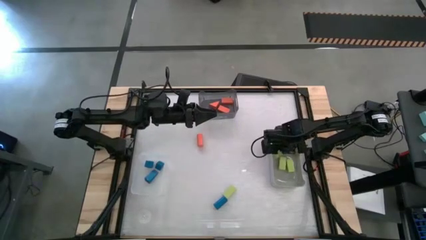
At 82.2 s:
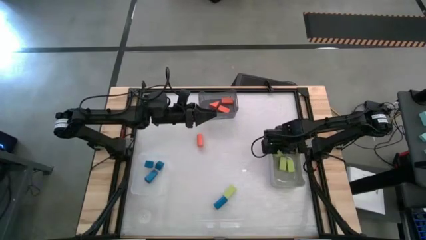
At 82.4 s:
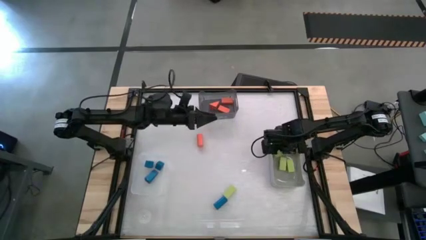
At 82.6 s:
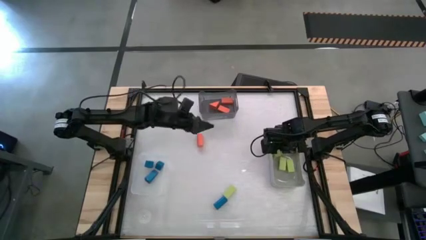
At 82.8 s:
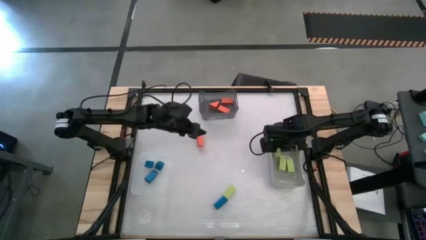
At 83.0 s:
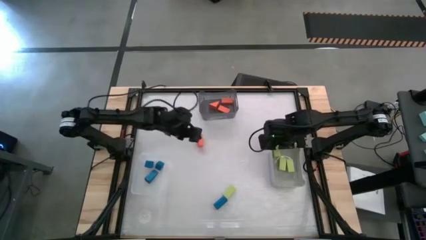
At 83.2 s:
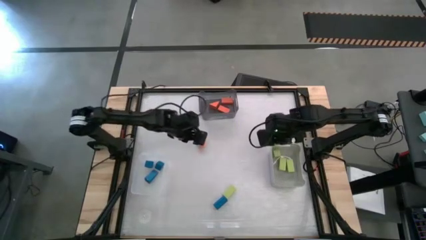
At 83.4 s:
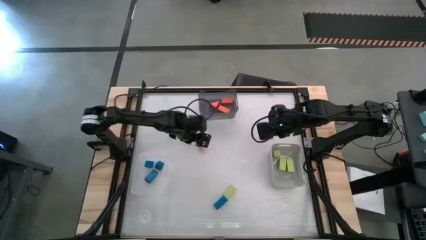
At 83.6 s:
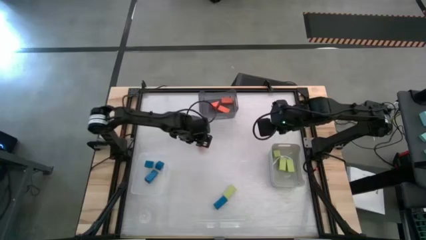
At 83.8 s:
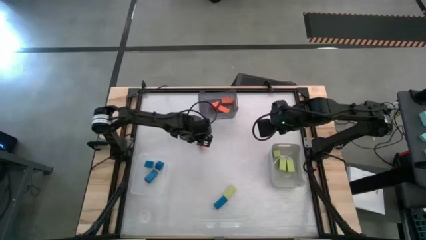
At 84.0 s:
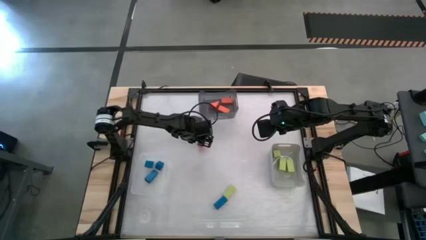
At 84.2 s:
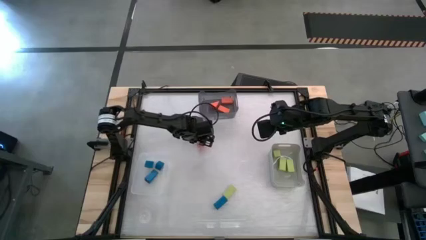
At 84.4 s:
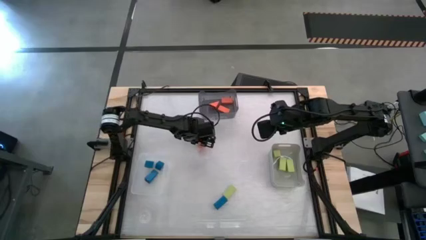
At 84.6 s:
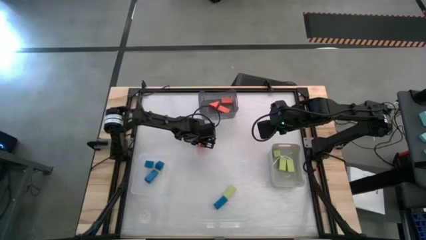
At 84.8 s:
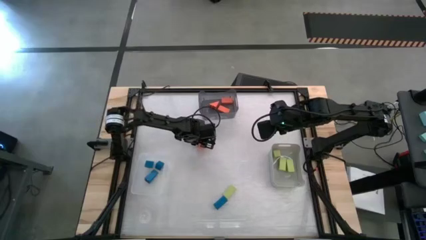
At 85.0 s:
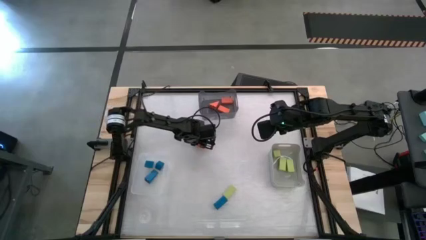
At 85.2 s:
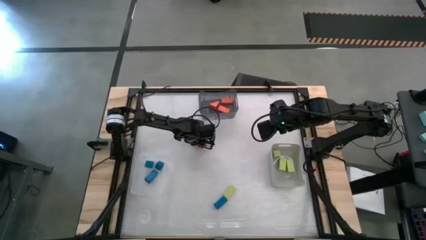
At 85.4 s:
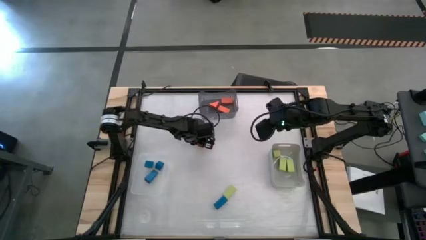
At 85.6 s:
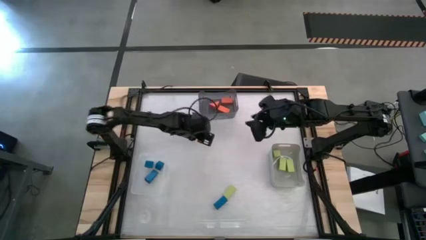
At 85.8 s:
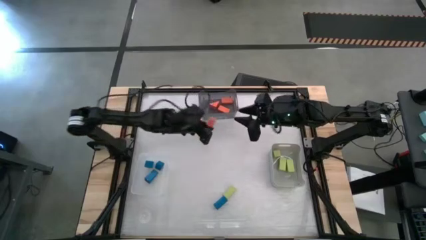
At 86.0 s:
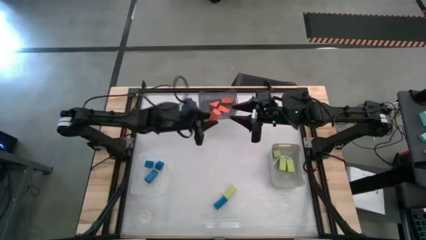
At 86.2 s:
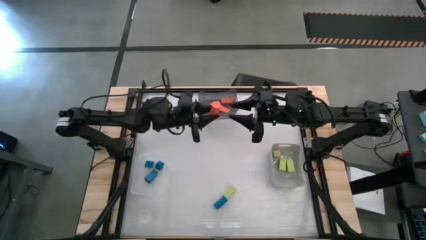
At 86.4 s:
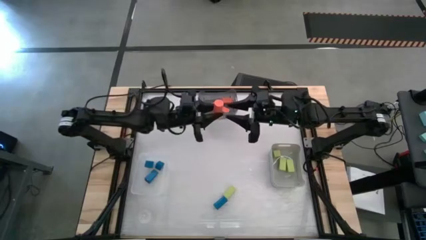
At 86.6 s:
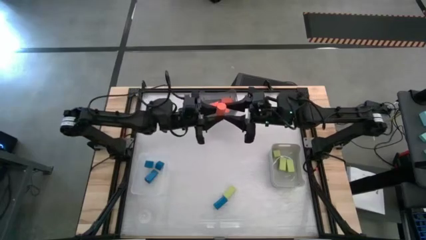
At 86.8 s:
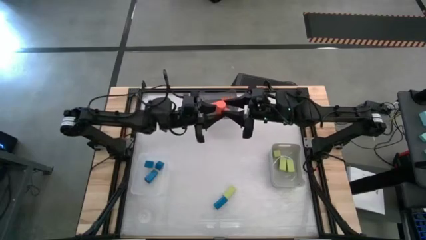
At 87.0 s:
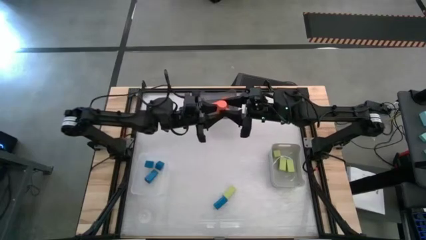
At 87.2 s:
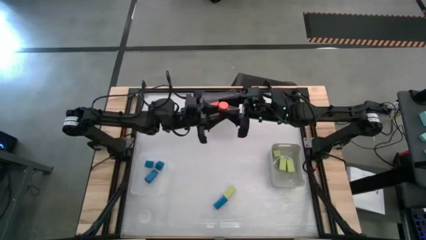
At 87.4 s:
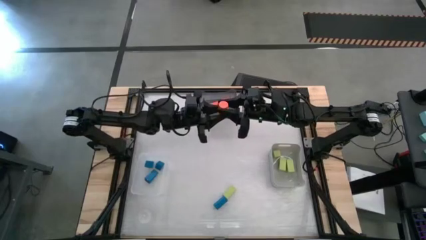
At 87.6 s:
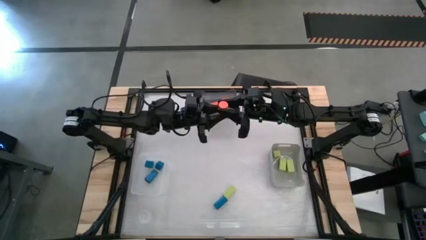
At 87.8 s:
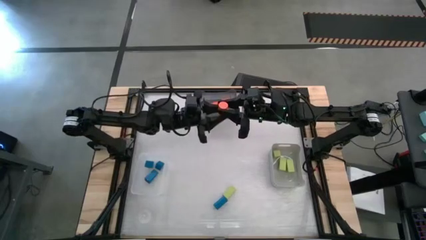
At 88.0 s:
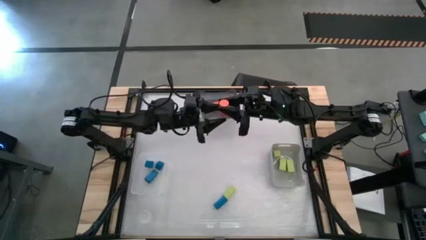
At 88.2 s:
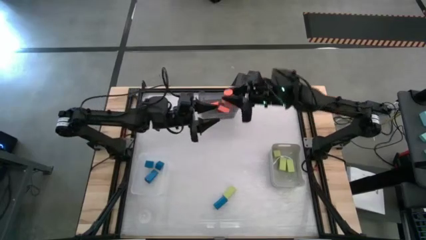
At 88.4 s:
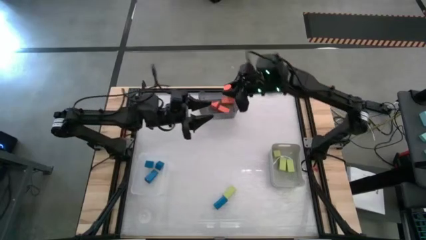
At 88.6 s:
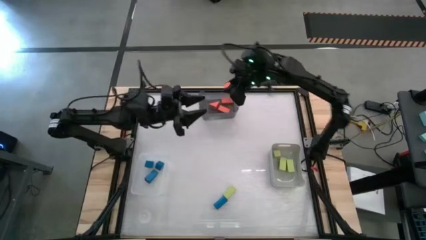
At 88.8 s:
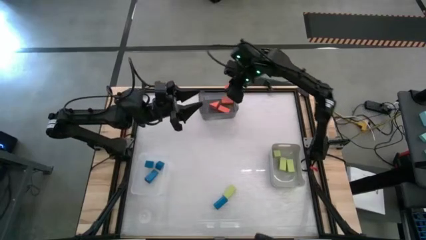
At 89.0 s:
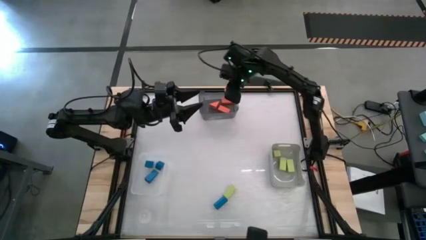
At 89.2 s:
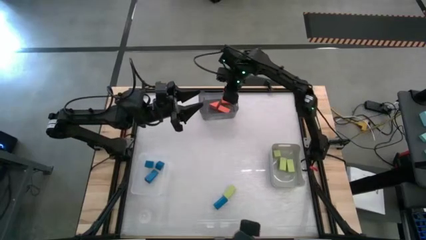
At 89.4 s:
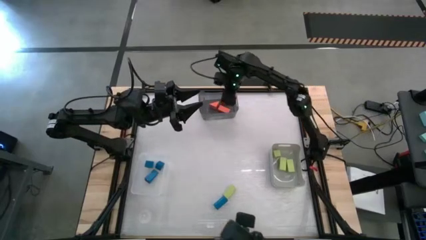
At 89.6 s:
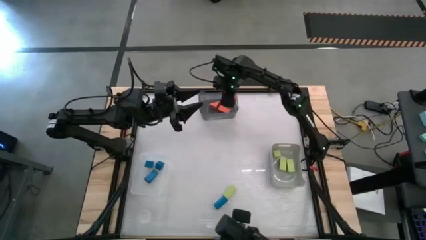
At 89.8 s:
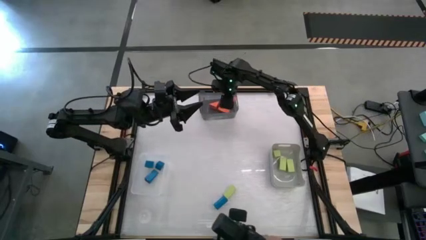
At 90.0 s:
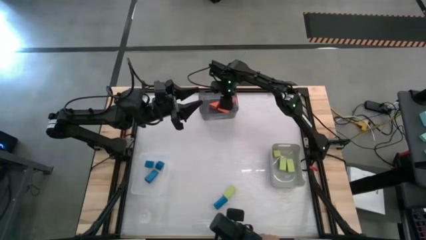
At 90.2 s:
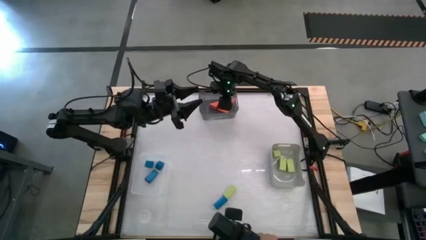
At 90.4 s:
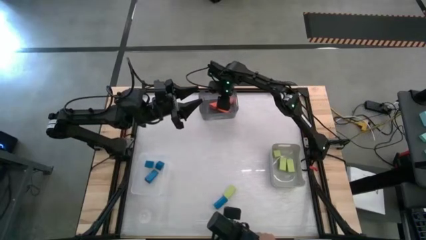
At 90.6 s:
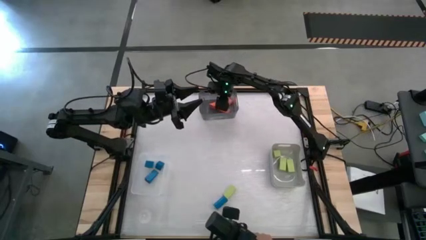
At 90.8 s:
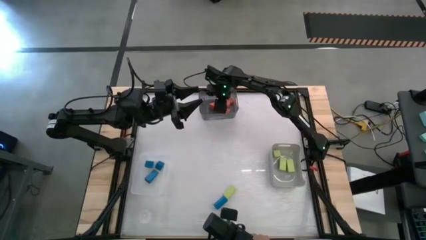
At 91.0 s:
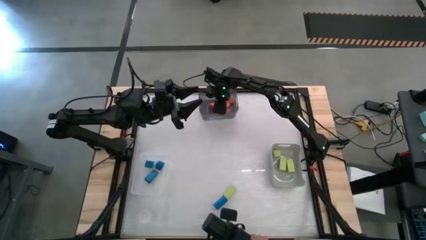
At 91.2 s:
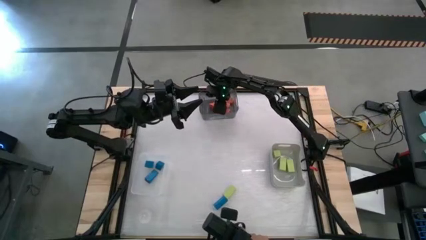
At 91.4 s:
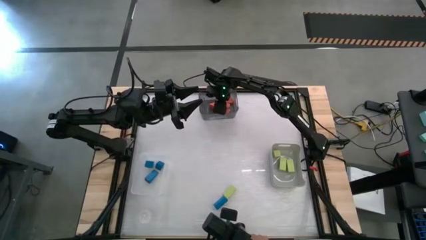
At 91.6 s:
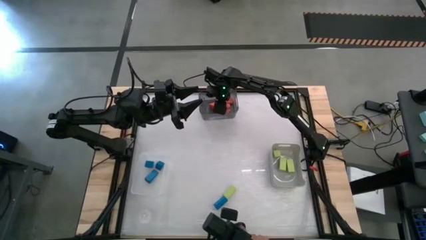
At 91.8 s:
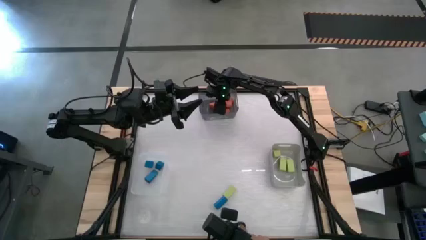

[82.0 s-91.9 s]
Task: Sort & place blocks by color
Put the orange block into the black bin

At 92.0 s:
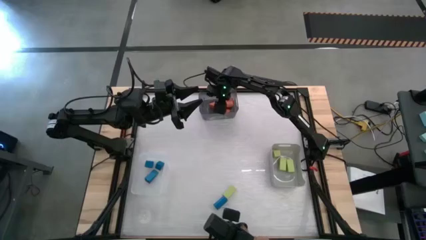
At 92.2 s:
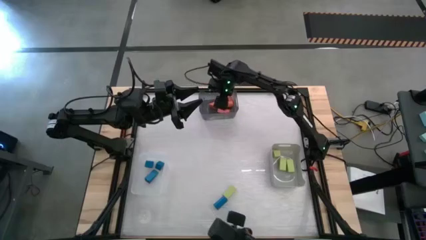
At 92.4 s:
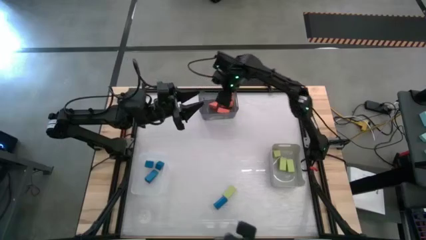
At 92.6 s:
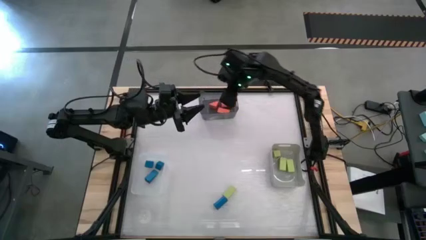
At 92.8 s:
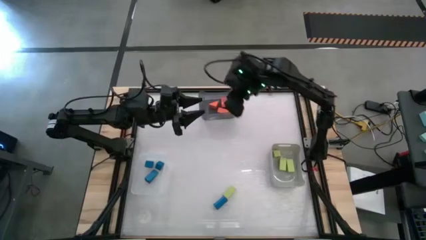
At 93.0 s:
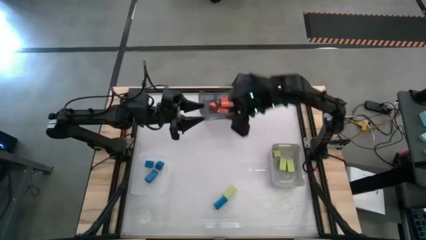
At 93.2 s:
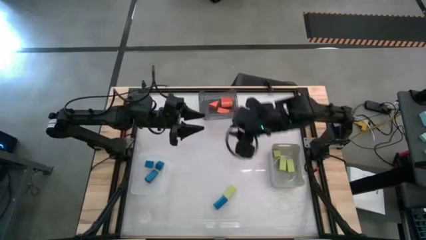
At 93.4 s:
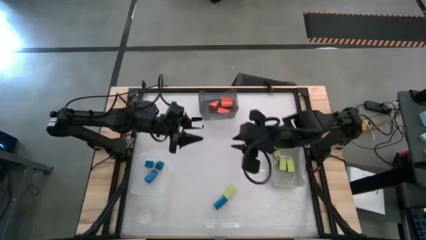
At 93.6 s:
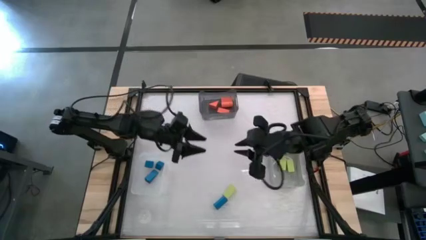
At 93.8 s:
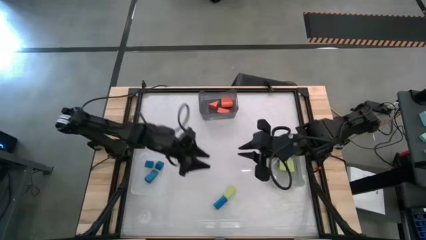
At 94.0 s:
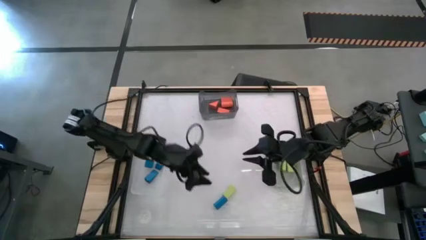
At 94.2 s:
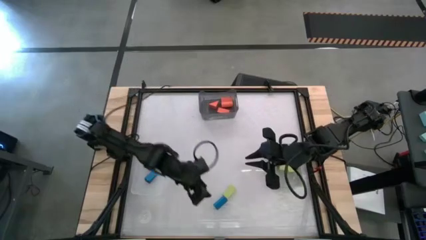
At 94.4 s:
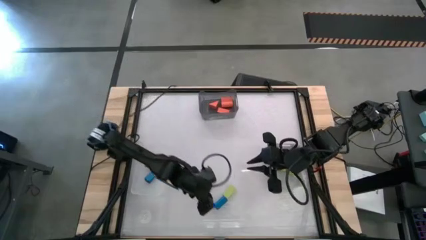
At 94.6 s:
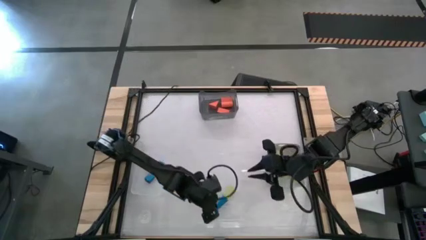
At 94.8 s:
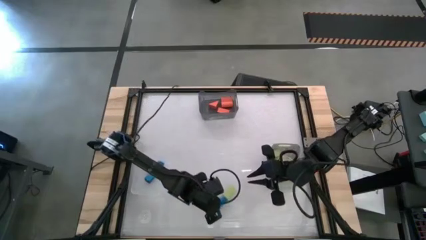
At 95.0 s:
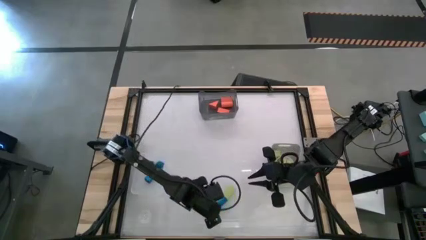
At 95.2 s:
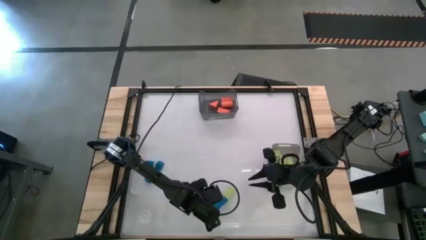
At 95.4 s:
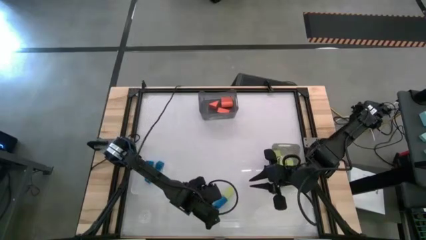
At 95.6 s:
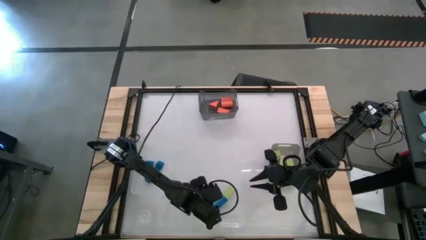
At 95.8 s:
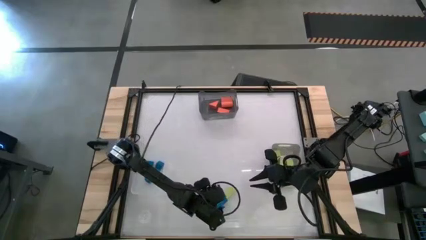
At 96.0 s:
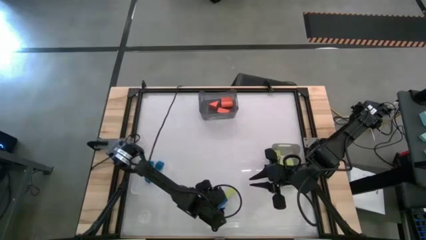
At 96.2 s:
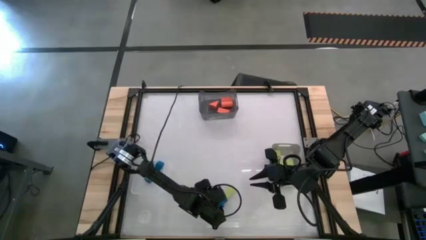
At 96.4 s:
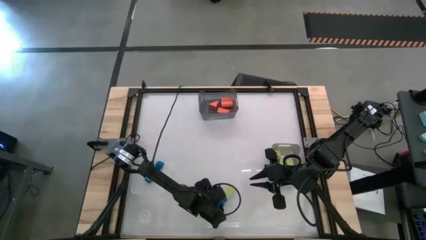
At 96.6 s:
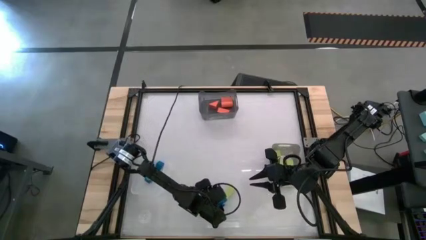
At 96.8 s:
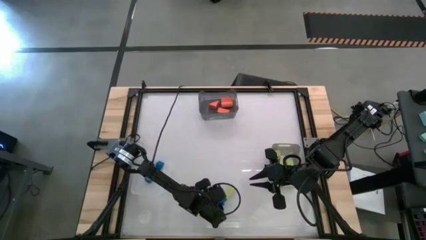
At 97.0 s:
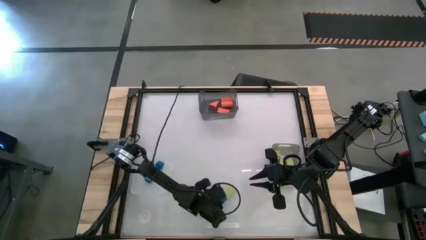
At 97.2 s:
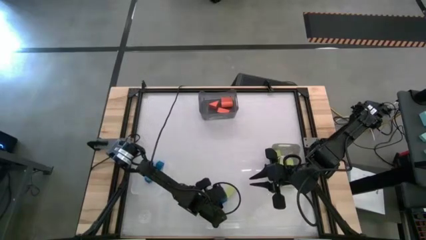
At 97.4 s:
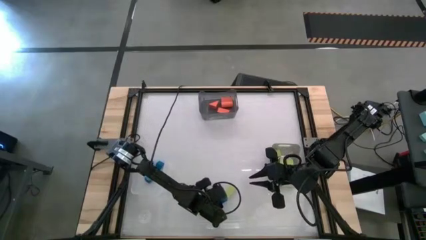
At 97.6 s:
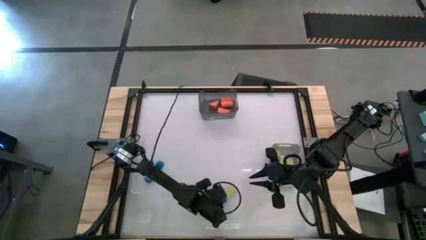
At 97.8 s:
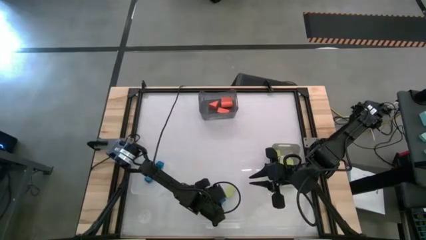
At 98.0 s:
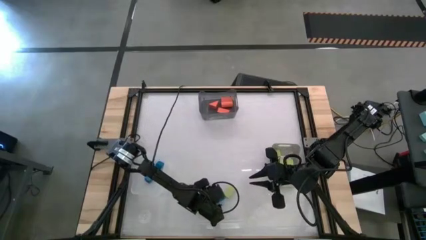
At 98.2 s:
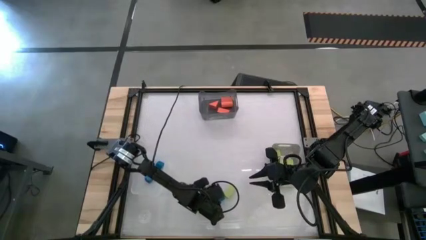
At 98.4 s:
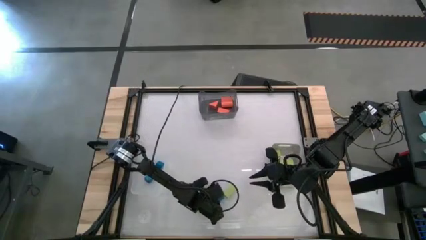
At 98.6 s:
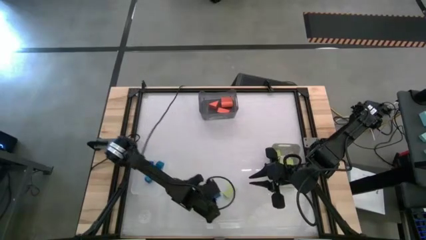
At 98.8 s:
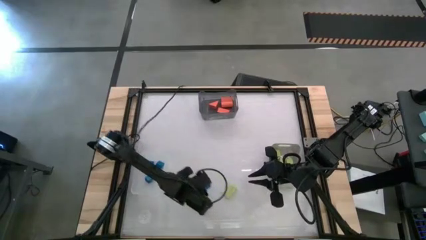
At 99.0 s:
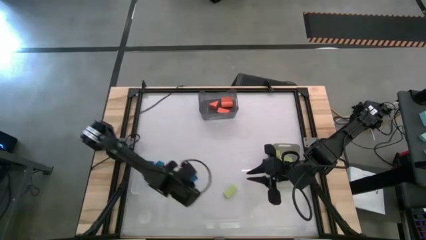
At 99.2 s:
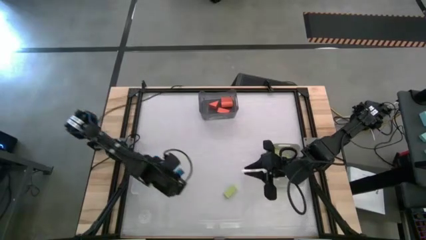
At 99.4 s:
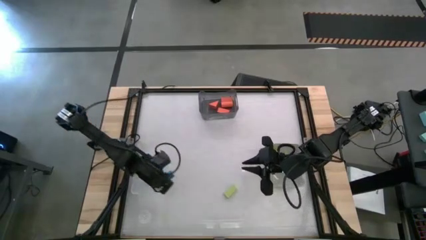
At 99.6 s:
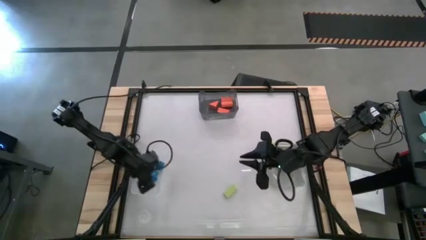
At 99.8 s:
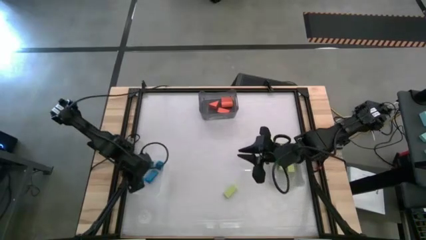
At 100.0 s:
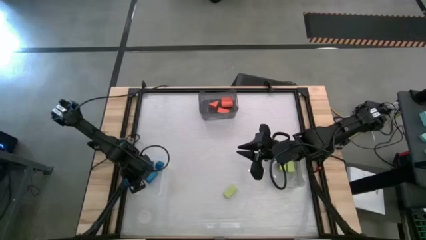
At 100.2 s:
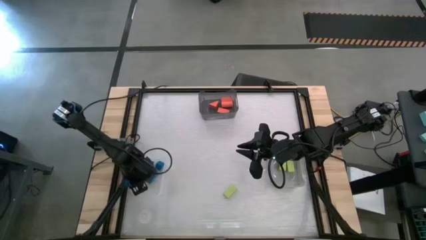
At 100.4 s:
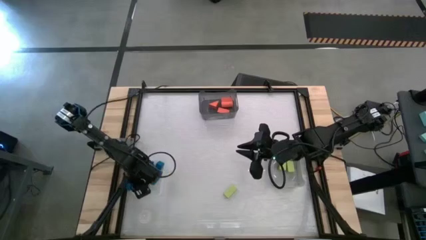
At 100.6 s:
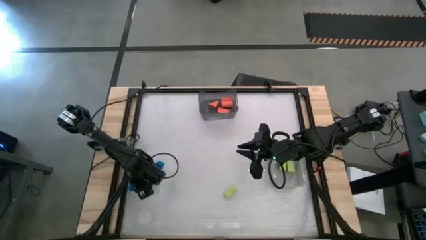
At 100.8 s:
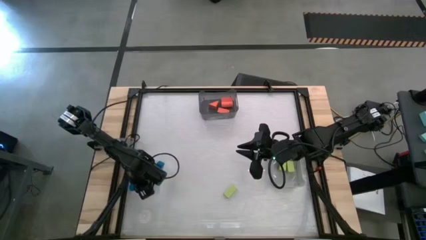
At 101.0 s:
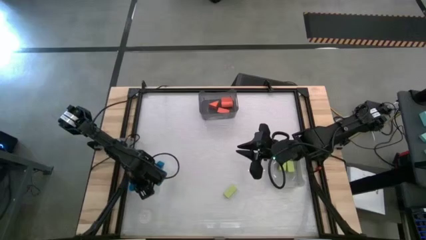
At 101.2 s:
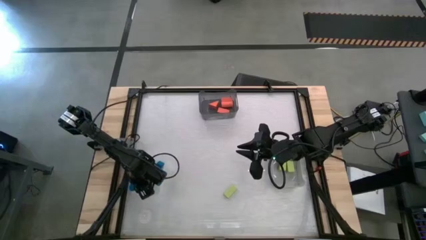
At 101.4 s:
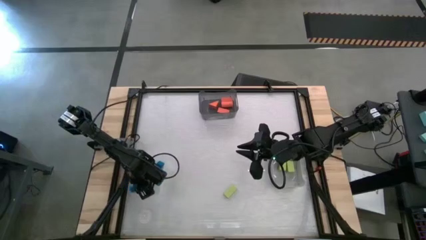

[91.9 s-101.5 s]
Put the blue block into the white bin
